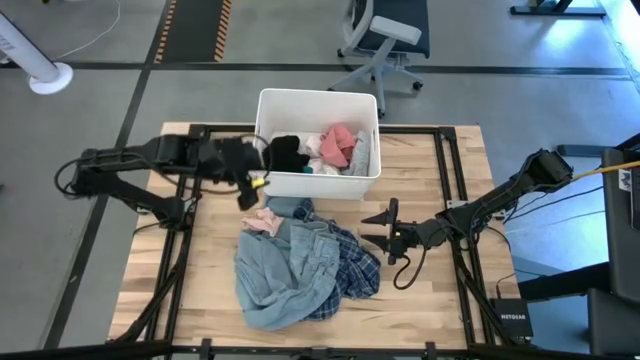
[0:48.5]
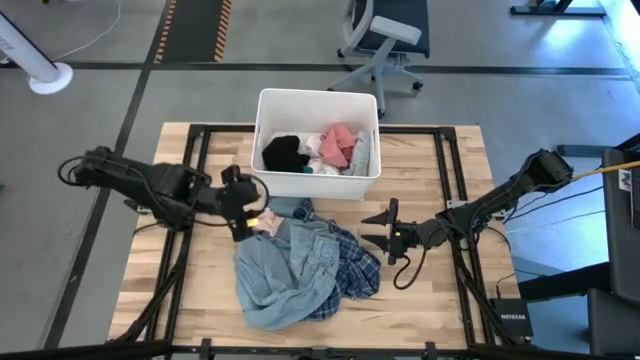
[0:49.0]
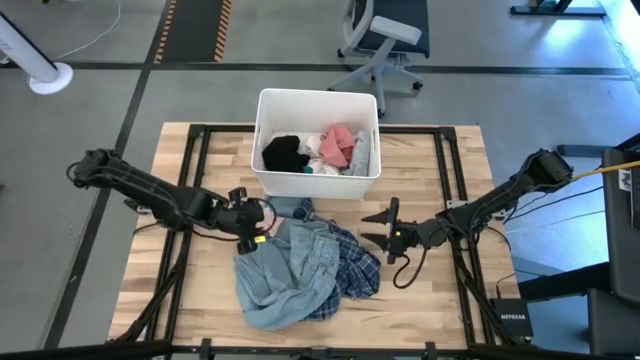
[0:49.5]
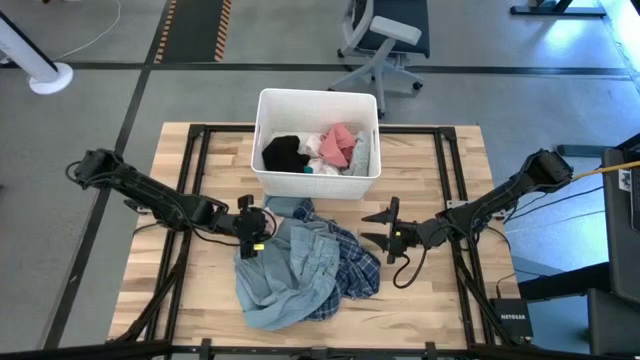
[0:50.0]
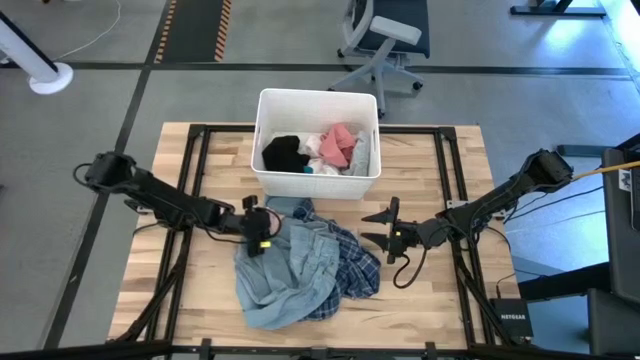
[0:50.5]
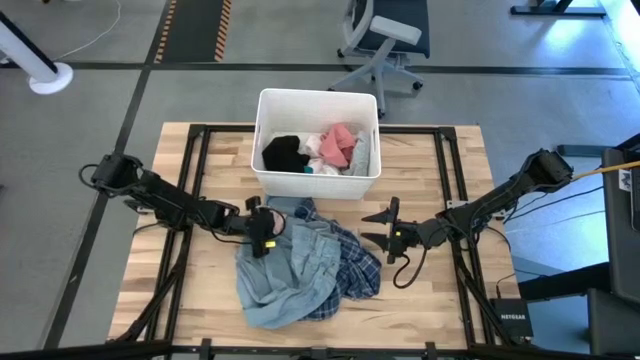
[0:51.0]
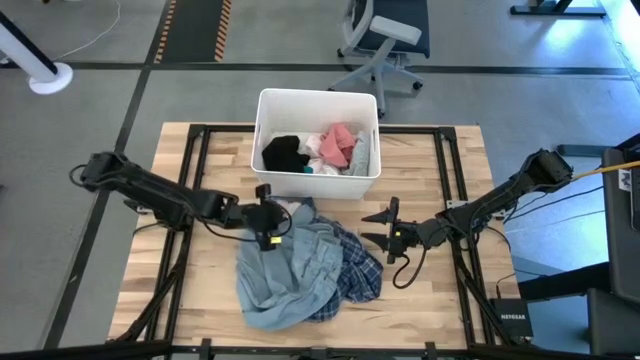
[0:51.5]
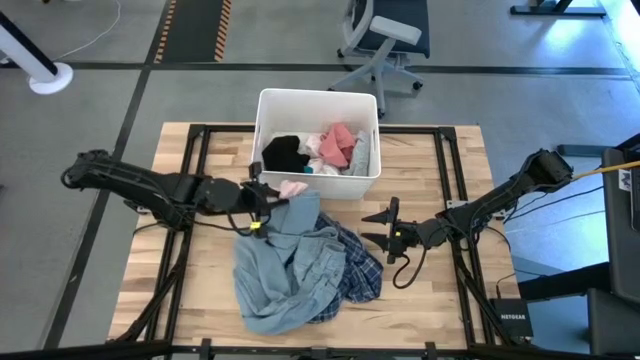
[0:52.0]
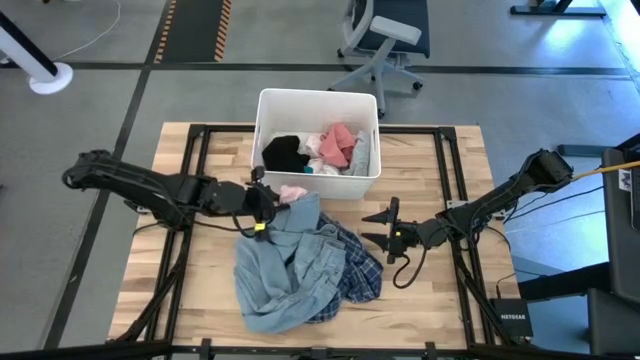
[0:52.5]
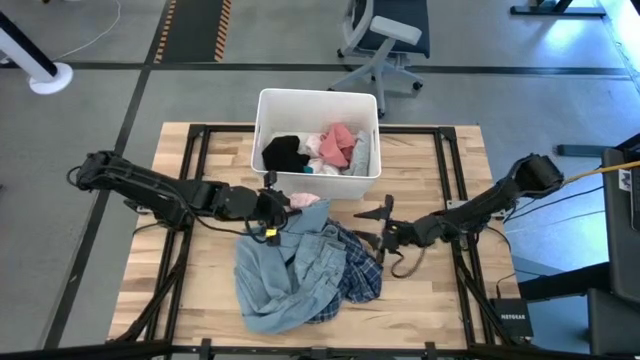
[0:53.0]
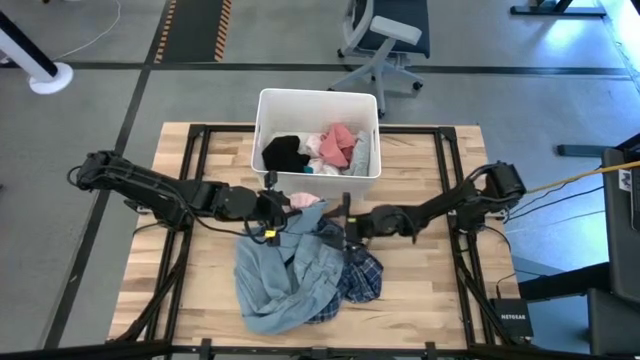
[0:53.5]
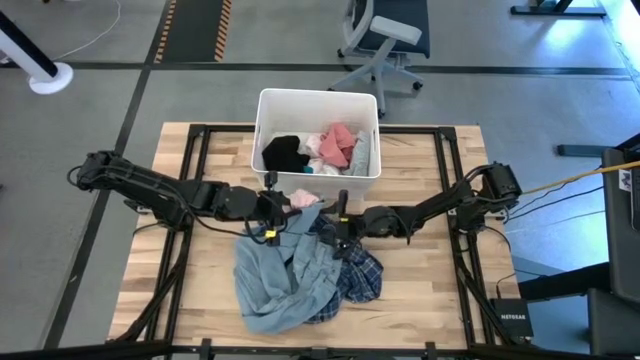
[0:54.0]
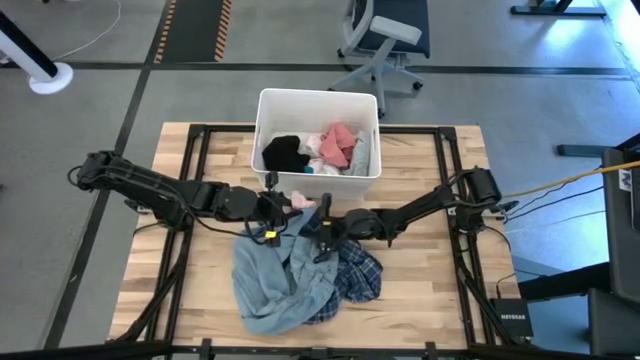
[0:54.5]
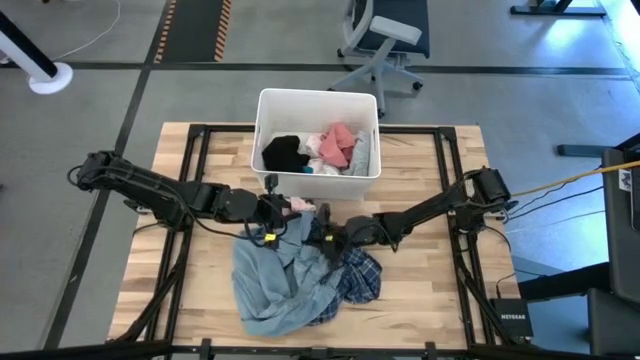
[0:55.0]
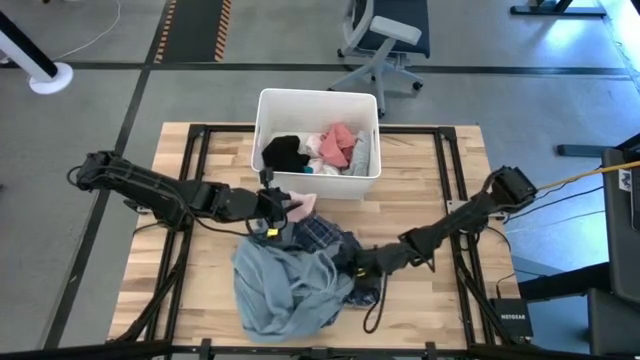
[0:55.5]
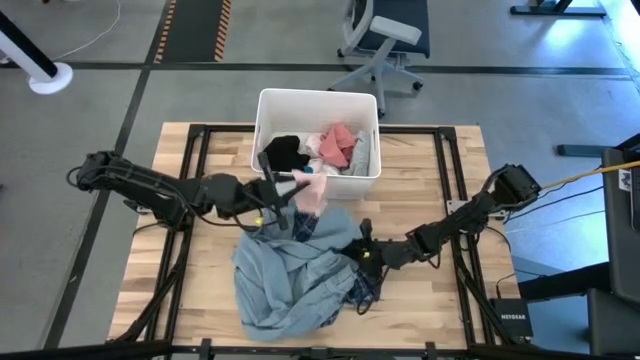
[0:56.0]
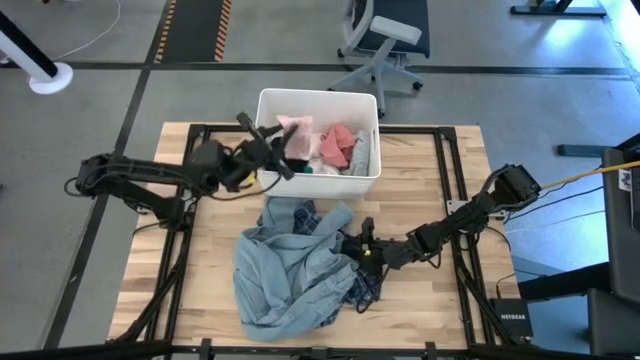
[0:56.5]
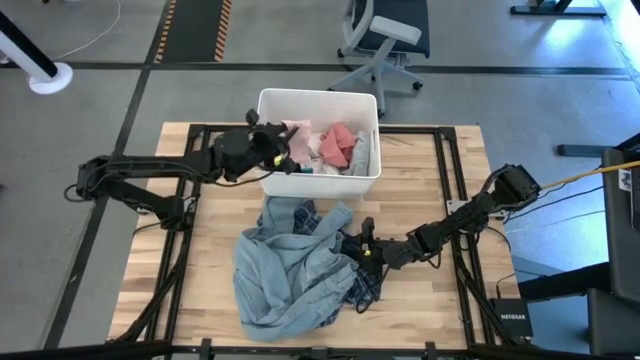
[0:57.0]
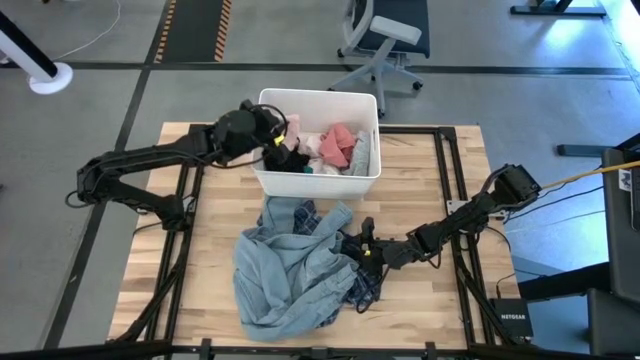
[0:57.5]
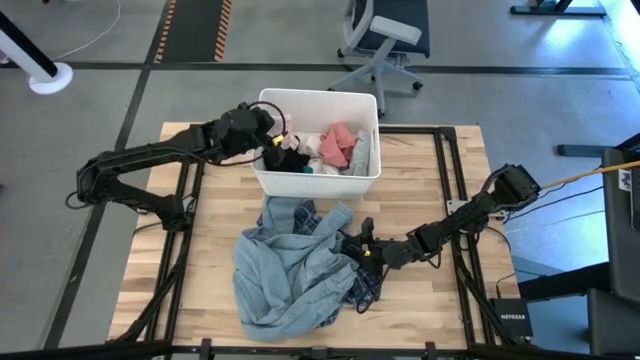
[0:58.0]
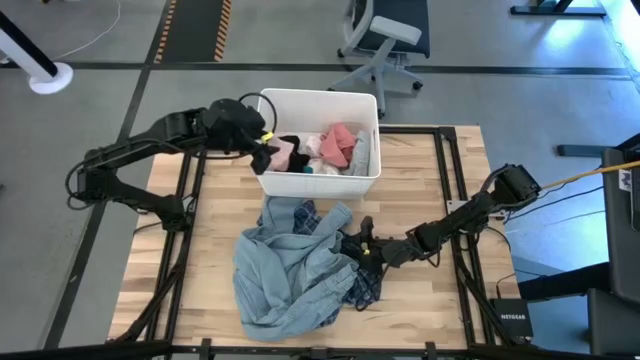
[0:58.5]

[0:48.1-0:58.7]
Task: Sort clothes
Put the light pink sock into the white laundry bin

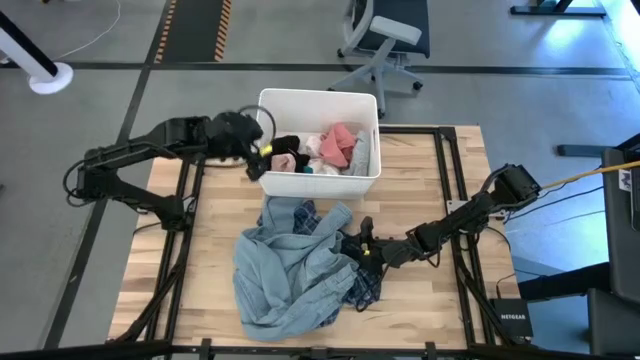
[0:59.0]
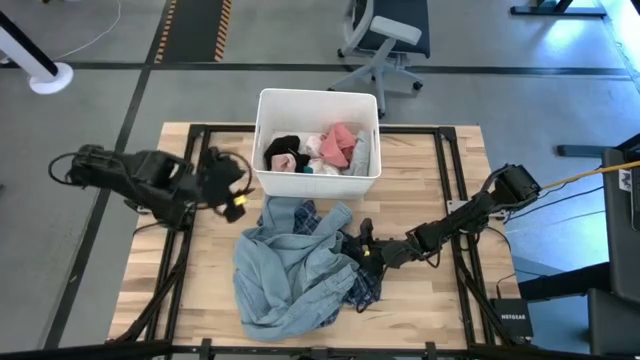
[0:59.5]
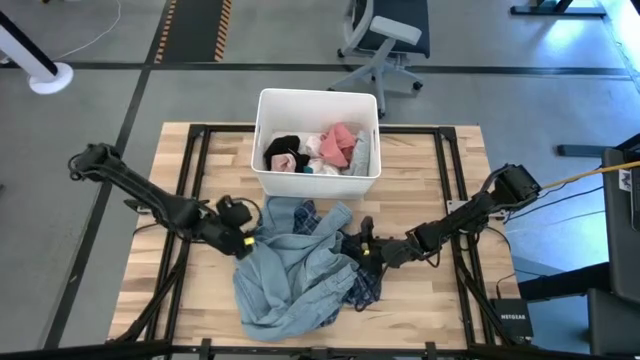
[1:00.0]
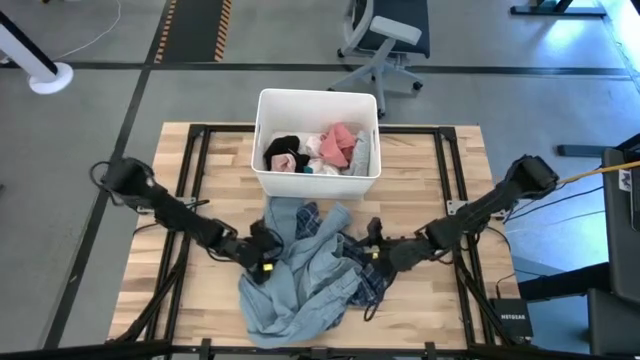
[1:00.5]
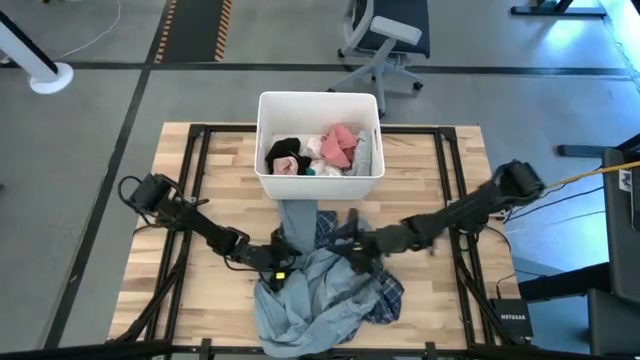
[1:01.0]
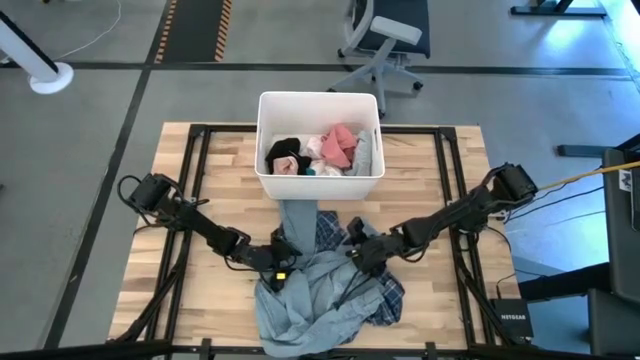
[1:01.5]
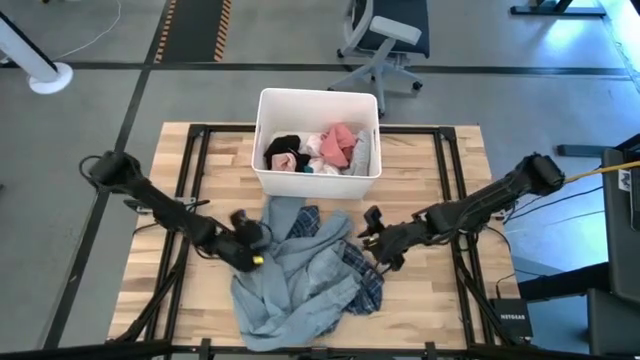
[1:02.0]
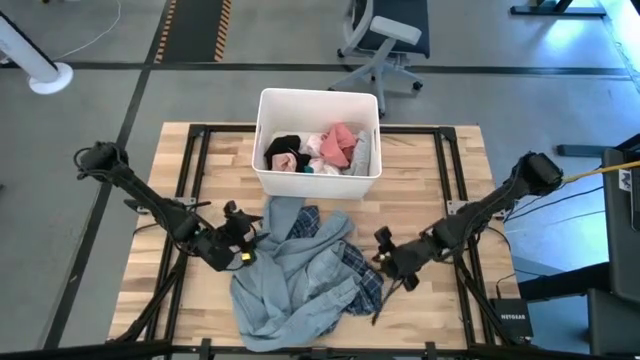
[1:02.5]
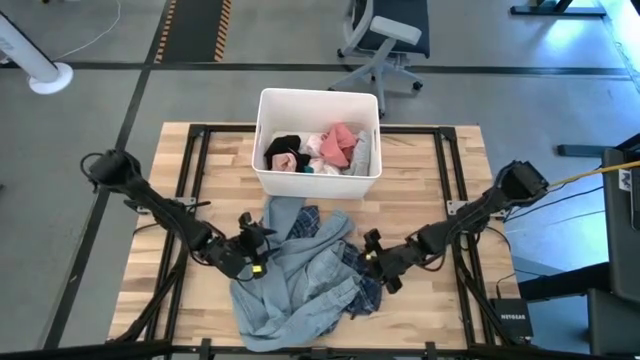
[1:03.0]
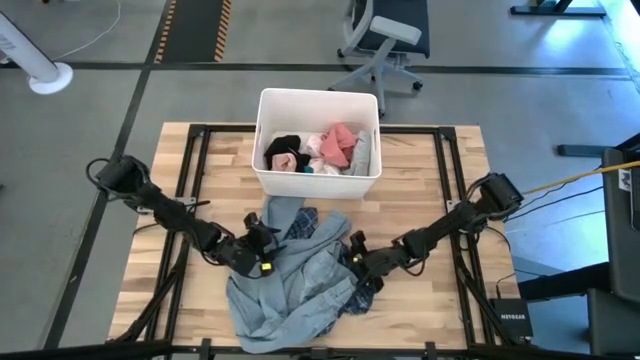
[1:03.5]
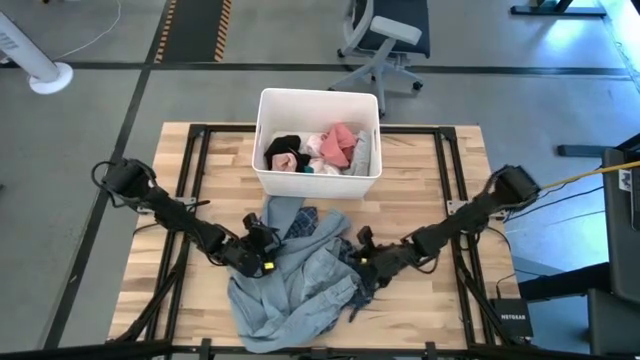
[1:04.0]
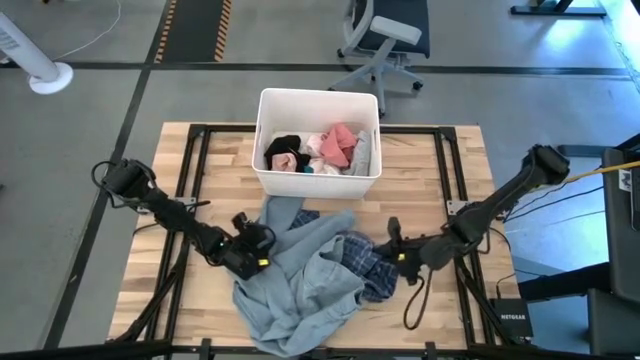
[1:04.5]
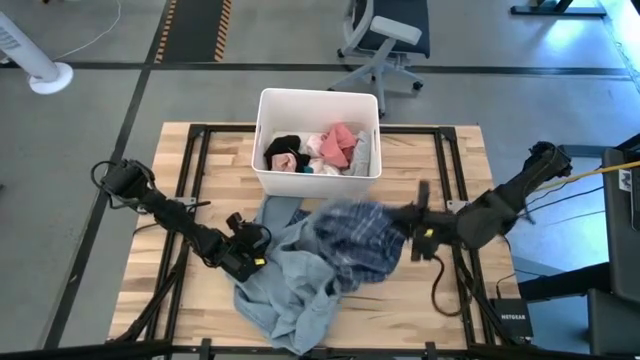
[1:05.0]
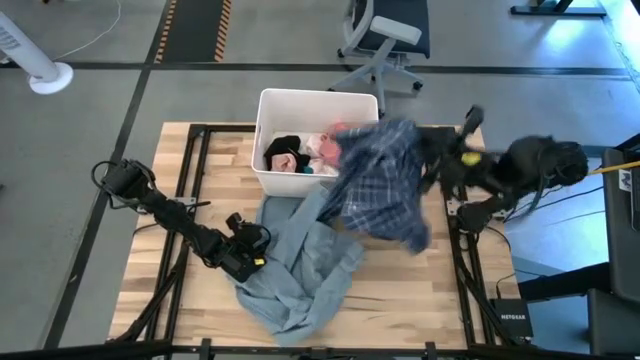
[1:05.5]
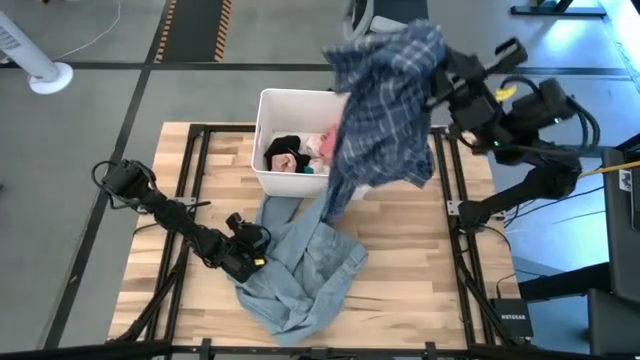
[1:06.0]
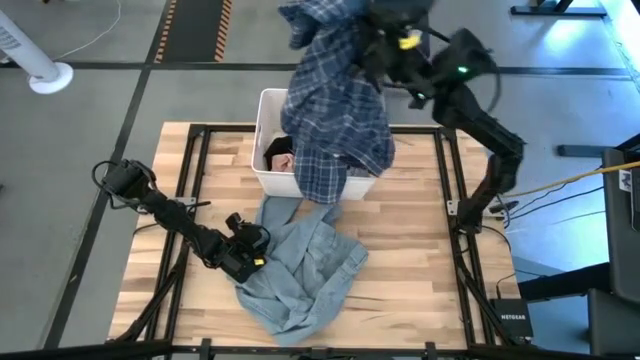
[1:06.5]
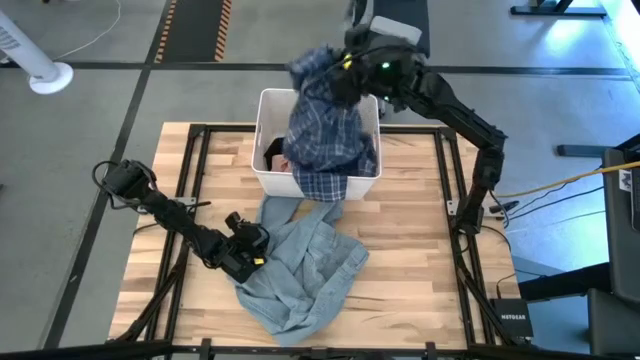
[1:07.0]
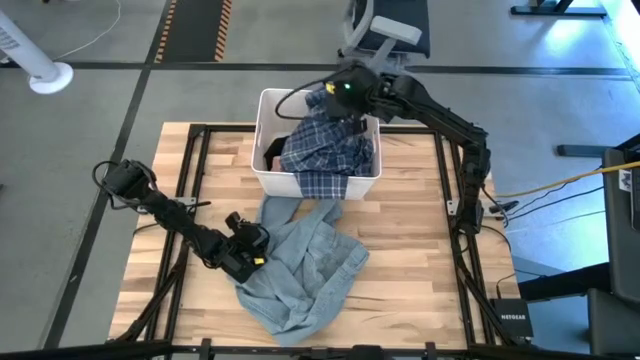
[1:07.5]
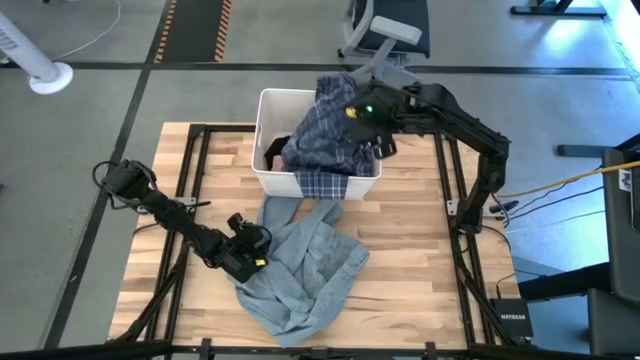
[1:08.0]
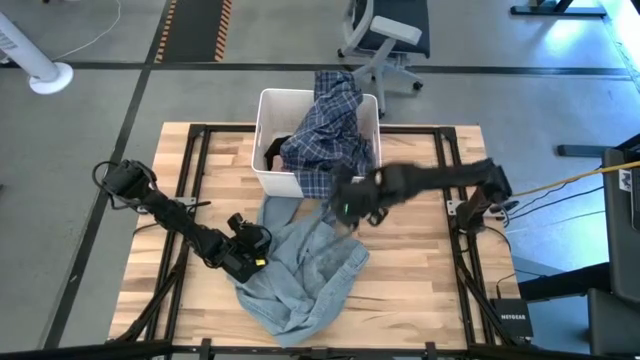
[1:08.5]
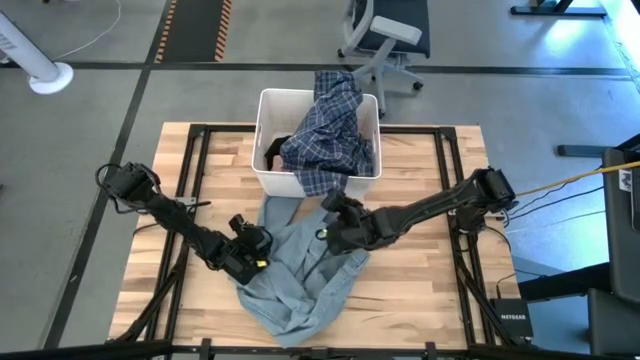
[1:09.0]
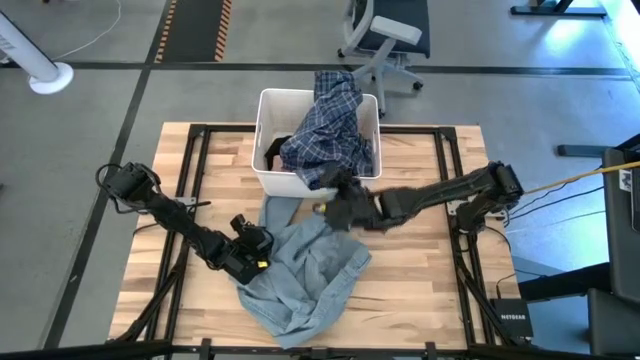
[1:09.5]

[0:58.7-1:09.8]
Put the blue polo shirt into the white laundry bin
